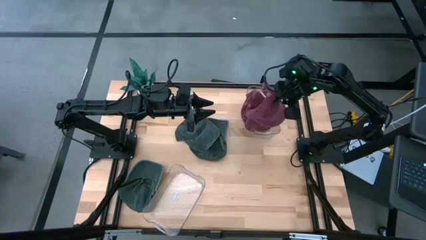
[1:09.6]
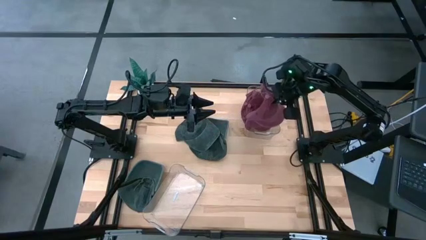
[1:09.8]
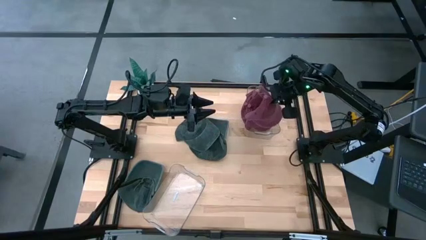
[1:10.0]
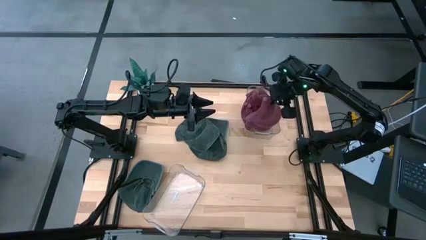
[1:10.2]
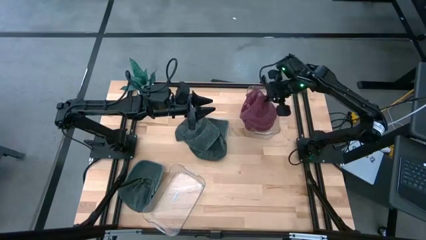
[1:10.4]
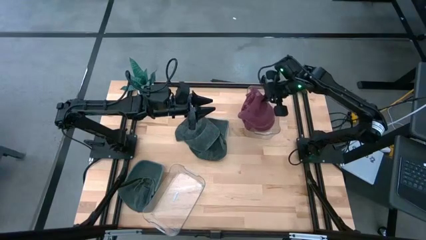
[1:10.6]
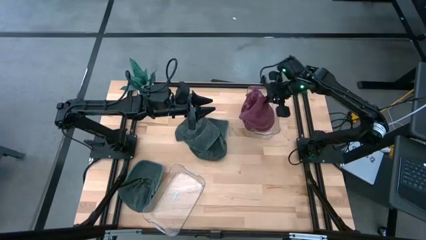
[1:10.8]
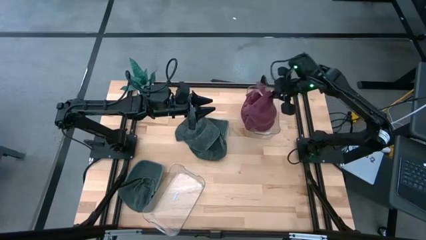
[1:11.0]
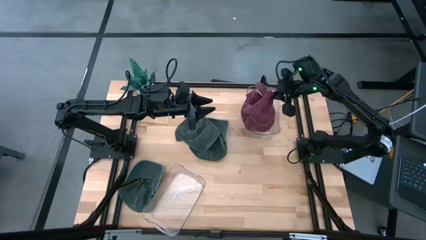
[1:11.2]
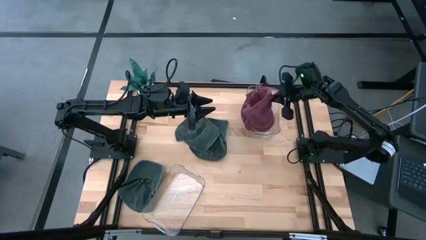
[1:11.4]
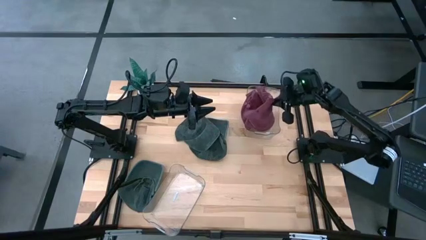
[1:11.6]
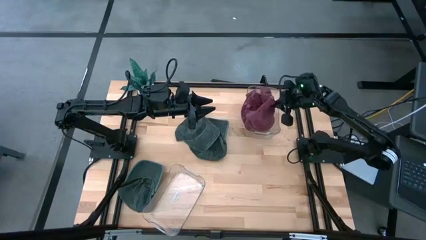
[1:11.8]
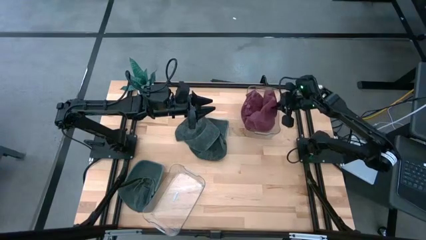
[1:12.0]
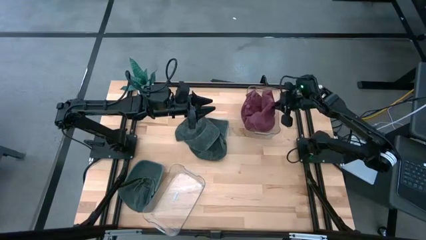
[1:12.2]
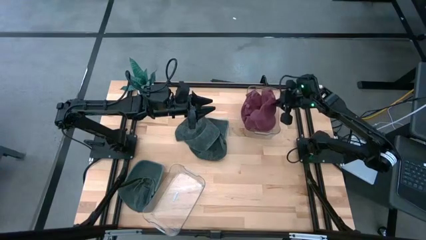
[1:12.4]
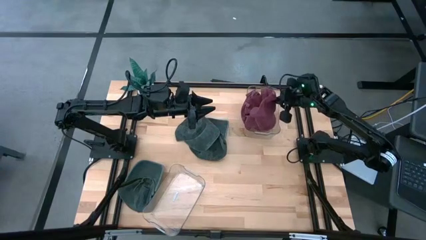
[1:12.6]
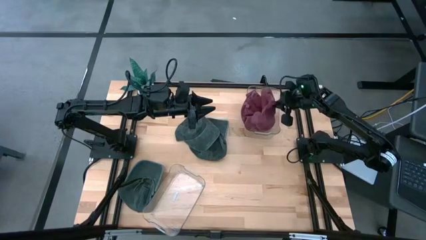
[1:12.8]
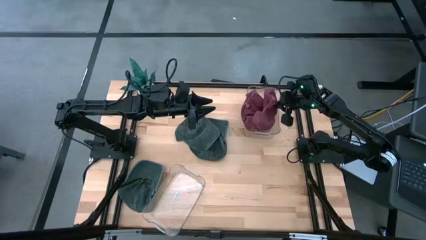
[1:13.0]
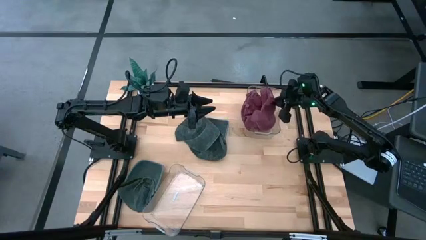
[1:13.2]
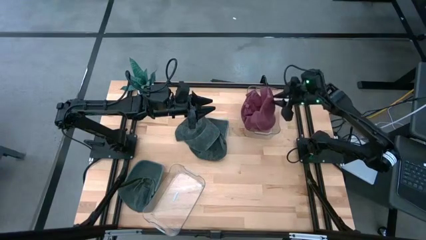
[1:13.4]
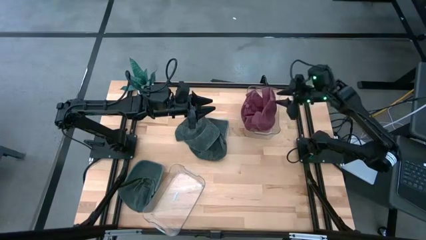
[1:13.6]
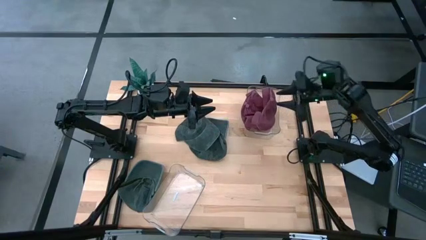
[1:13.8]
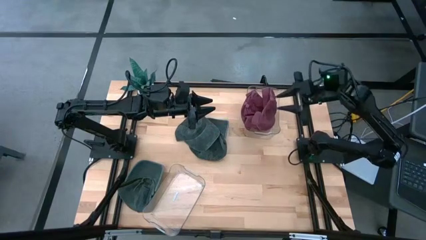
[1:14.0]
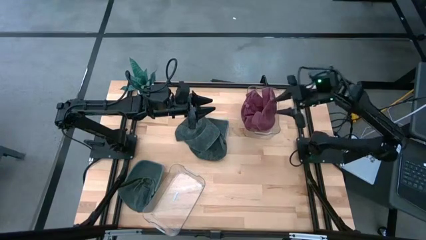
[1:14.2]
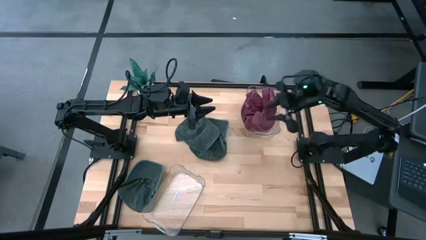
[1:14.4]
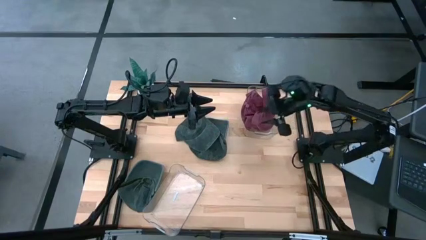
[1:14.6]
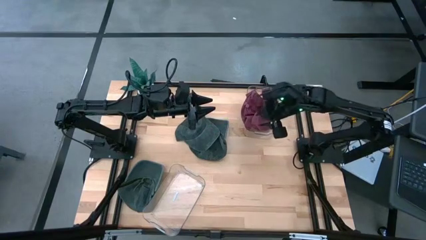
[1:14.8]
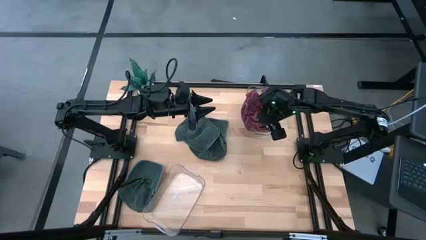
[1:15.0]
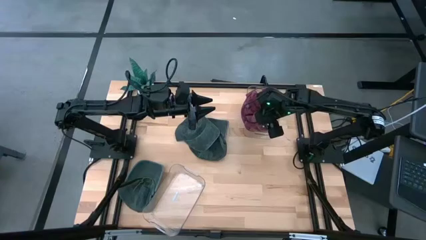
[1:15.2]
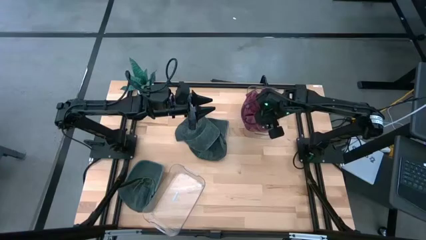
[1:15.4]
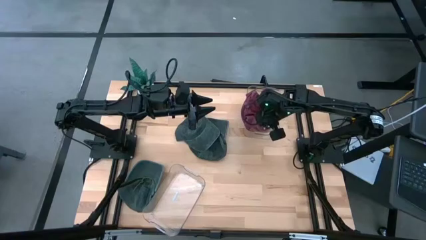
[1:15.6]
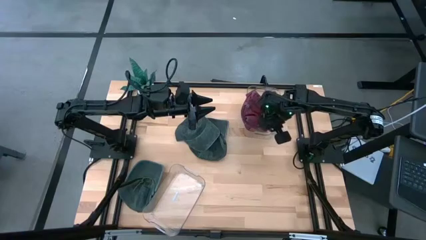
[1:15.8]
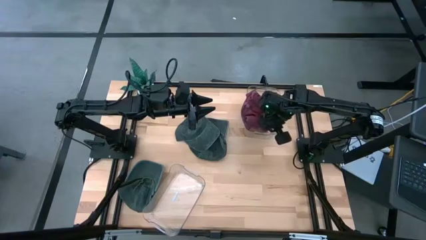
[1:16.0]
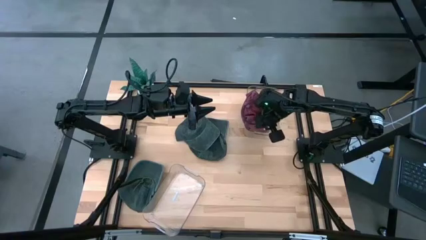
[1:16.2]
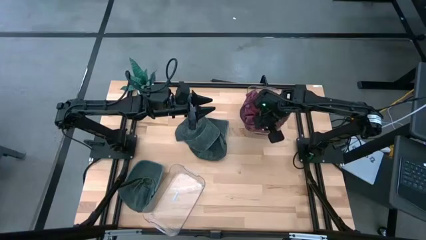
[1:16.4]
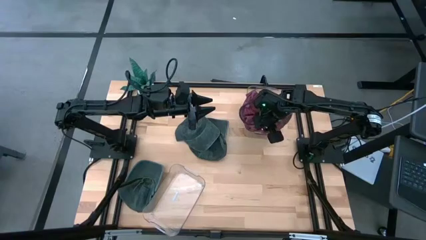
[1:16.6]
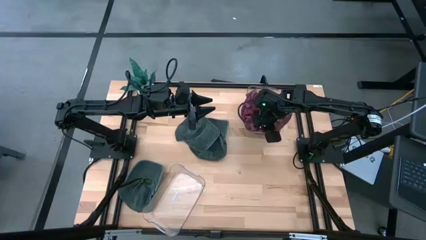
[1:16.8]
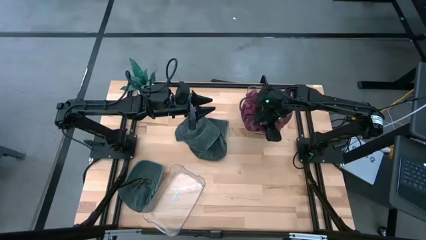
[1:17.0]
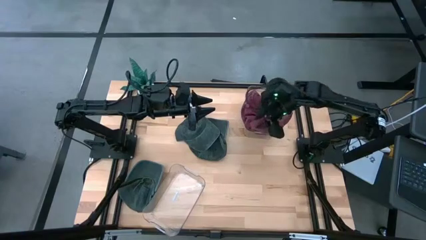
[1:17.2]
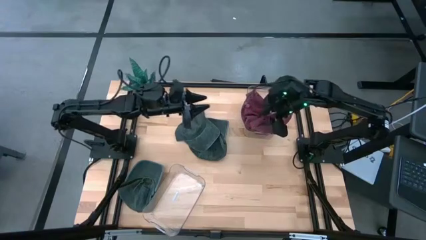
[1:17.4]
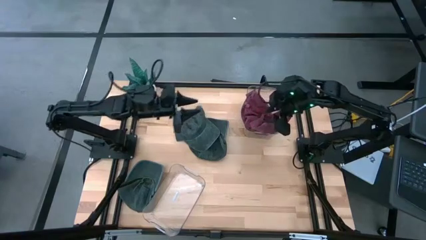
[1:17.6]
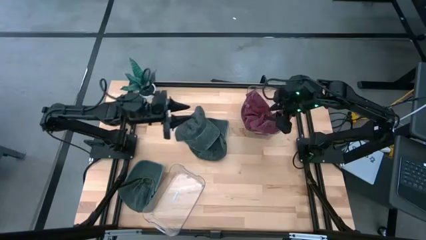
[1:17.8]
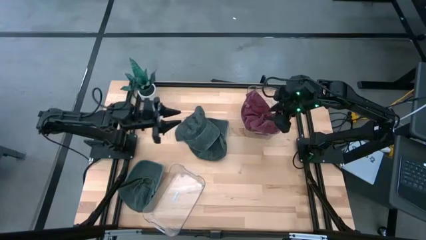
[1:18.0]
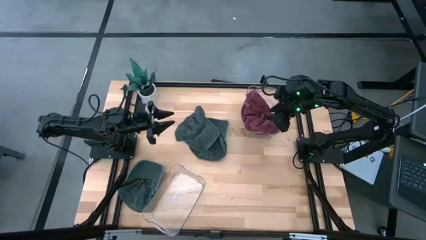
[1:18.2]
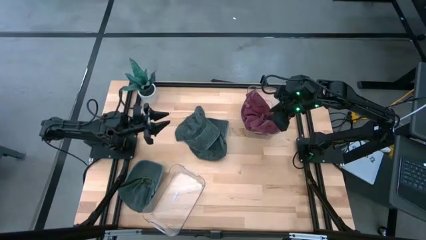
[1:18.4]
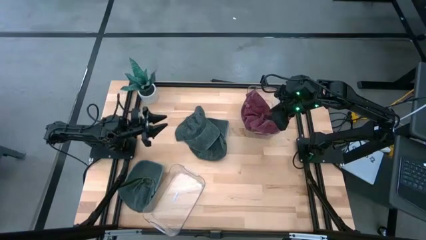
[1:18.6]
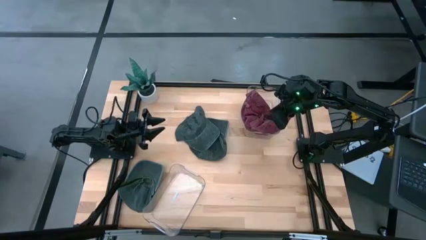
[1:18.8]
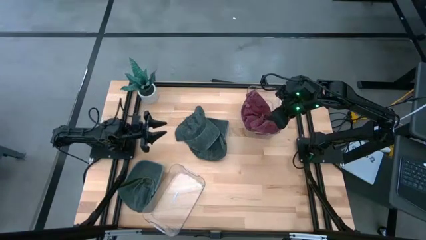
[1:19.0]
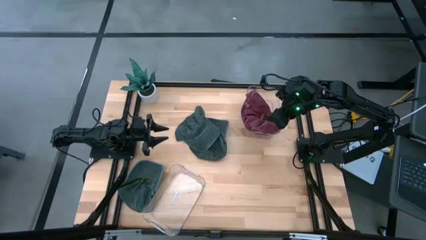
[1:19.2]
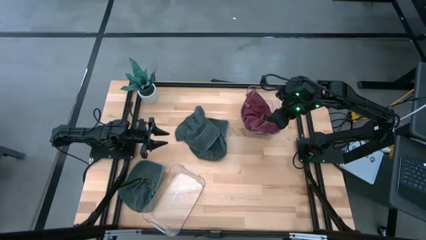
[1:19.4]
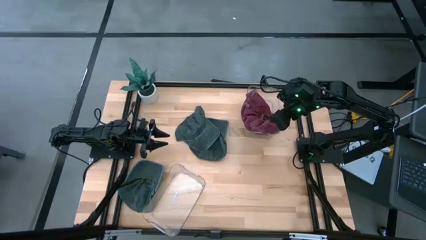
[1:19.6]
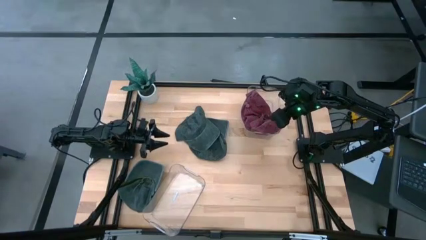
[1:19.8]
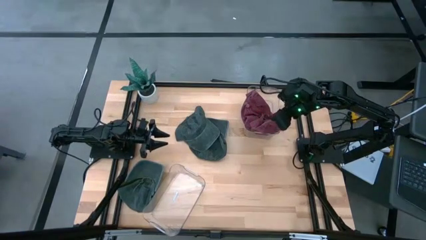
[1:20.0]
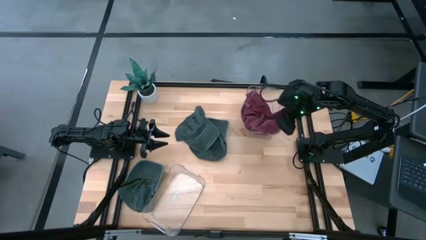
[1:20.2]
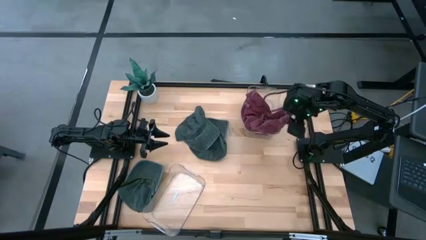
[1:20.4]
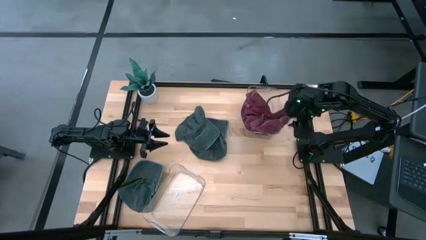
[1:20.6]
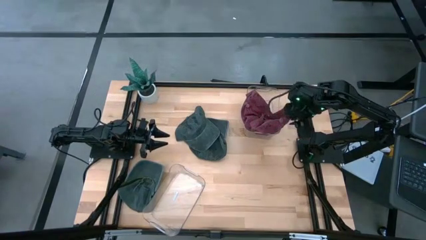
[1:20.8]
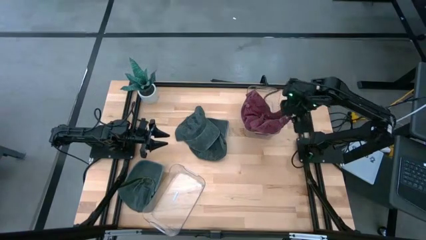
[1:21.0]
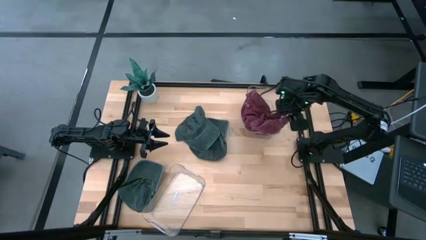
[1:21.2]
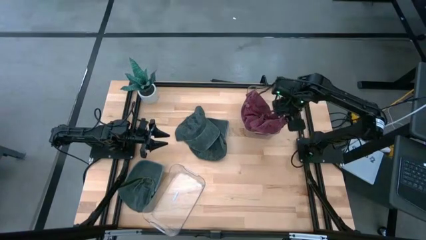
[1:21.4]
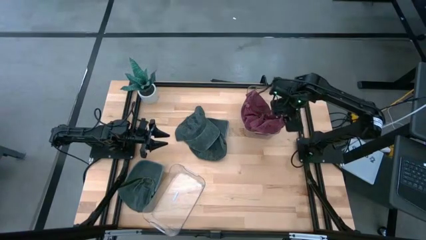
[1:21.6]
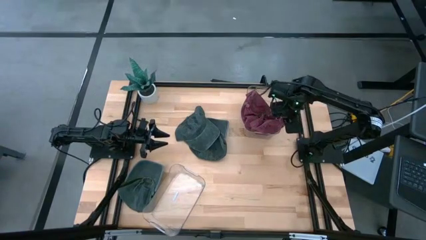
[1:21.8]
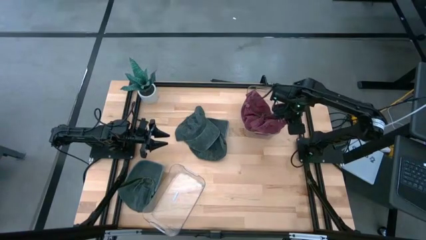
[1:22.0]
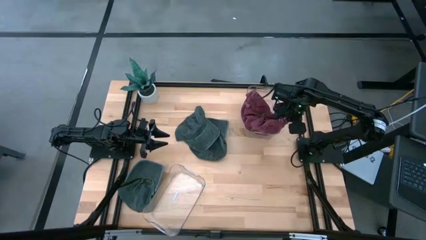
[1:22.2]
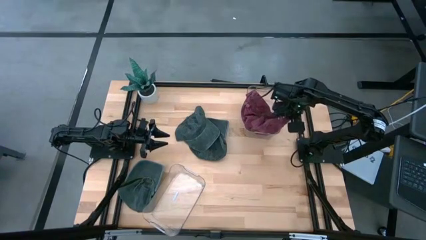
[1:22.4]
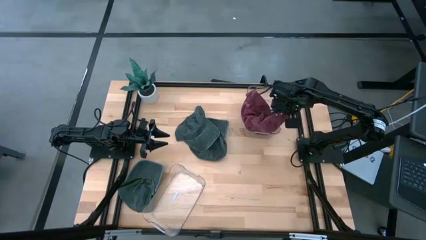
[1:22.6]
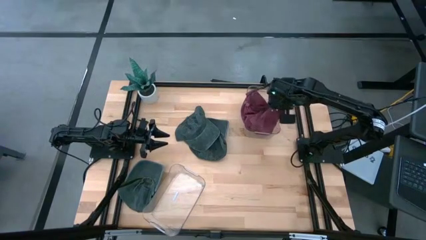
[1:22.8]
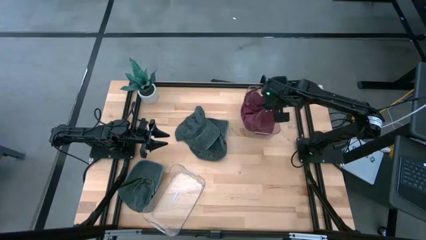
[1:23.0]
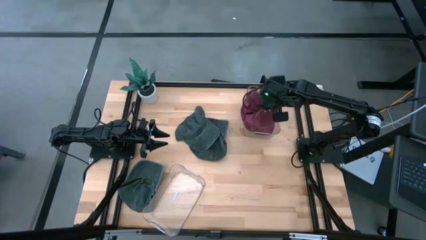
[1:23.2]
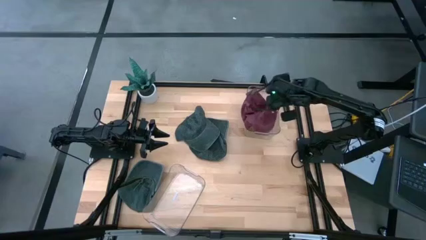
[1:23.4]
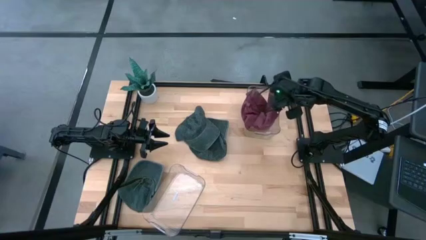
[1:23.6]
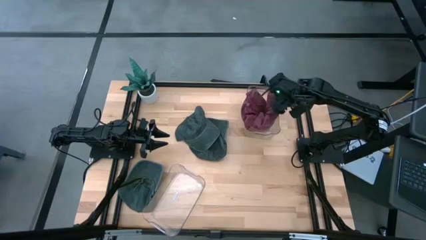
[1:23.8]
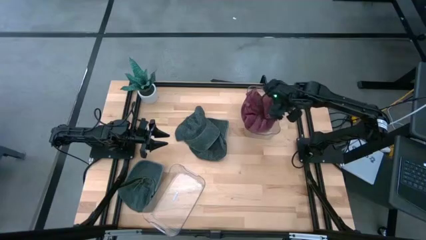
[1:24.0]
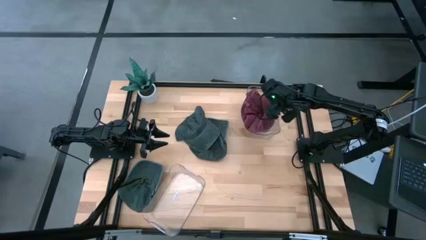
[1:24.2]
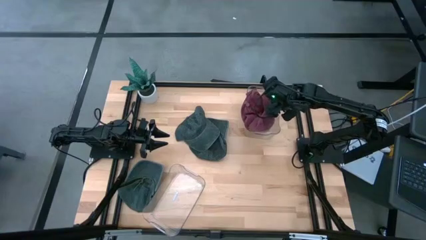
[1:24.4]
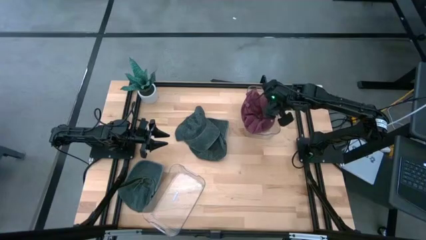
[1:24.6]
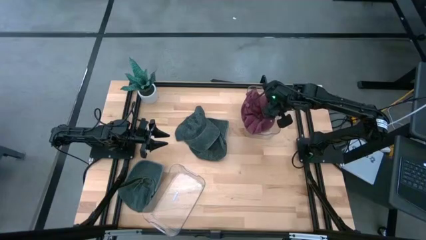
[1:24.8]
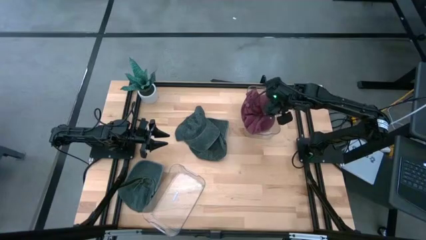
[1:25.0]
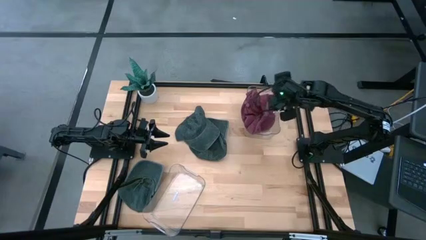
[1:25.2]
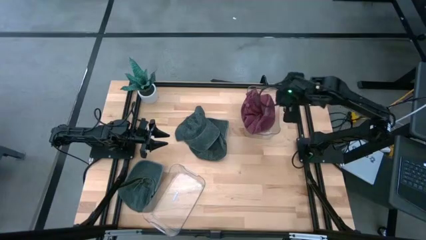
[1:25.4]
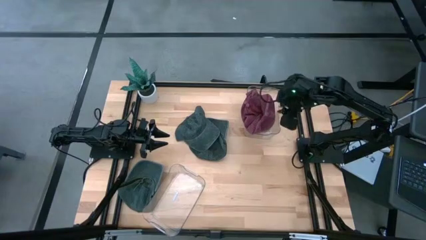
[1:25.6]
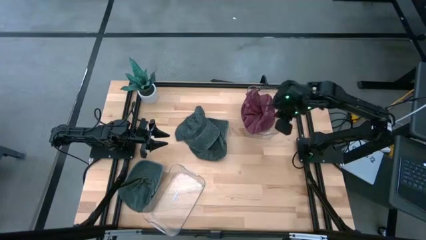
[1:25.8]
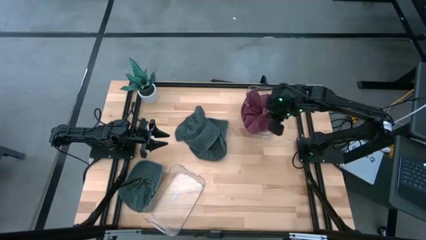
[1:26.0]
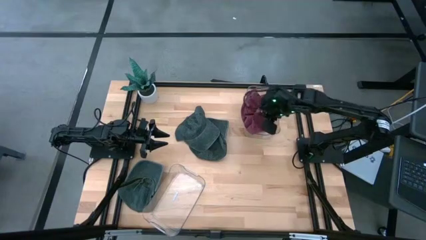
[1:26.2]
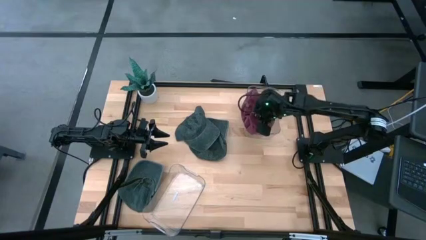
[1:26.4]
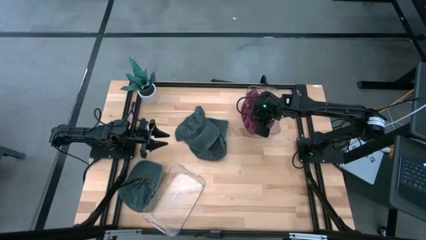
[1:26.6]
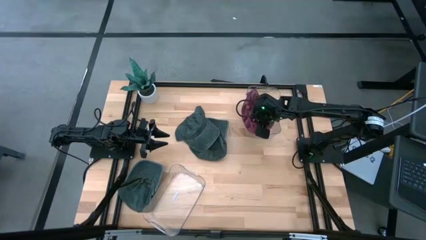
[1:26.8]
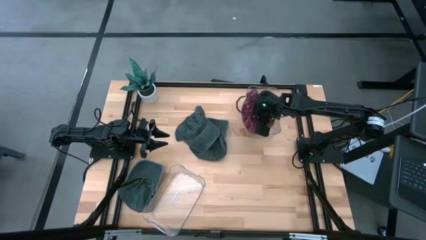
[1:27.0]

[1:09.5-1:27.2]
Task: Pick & Place hat
Put the red cap into the top transparent bin
